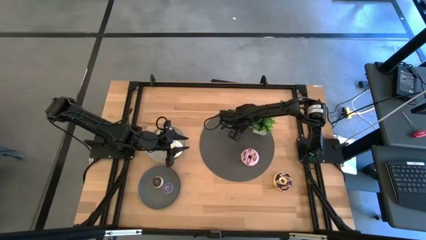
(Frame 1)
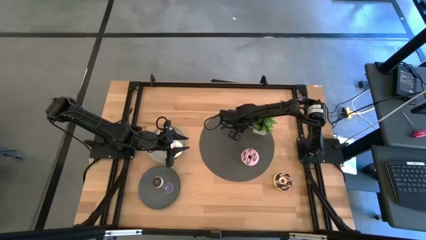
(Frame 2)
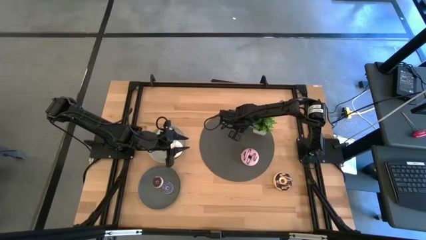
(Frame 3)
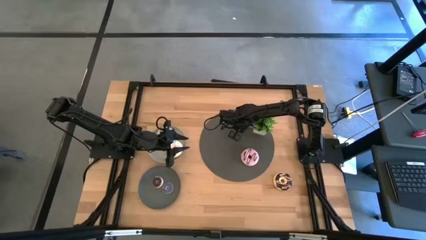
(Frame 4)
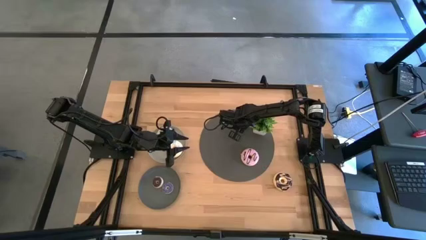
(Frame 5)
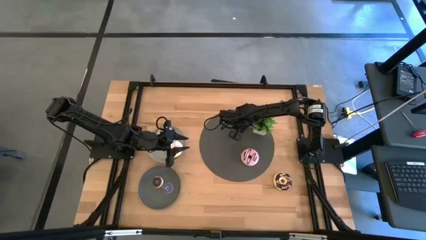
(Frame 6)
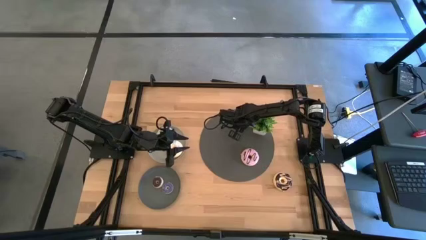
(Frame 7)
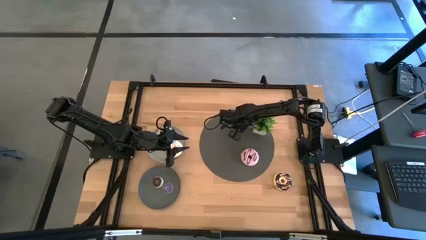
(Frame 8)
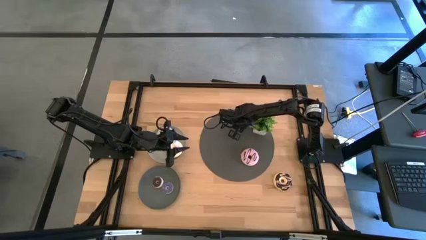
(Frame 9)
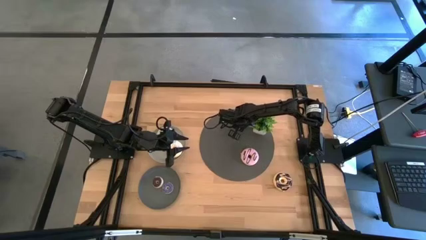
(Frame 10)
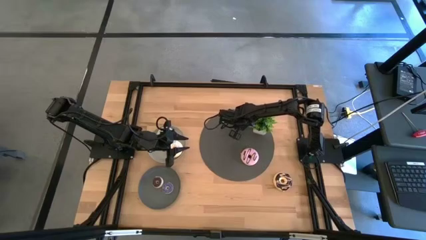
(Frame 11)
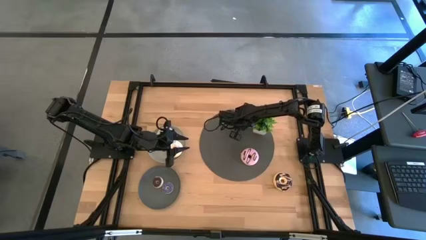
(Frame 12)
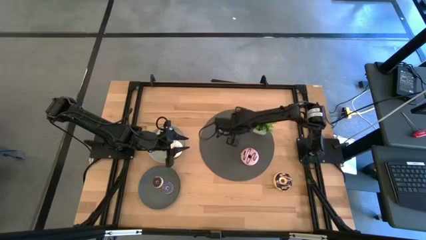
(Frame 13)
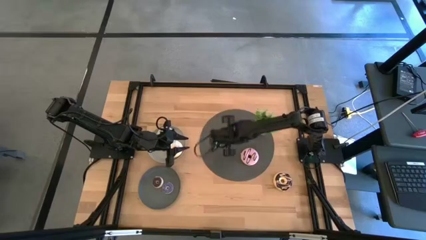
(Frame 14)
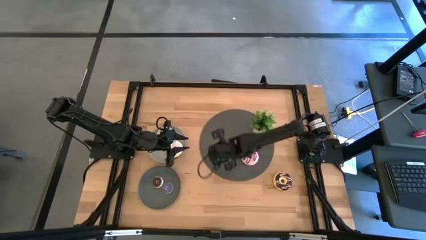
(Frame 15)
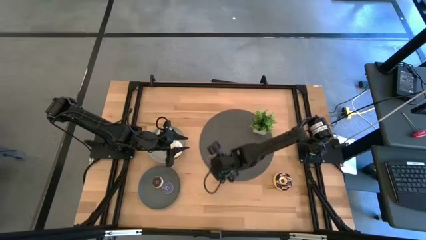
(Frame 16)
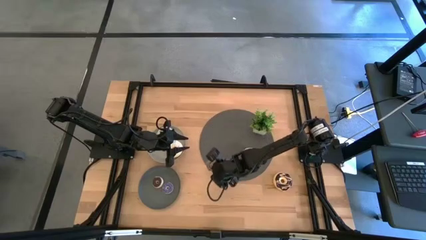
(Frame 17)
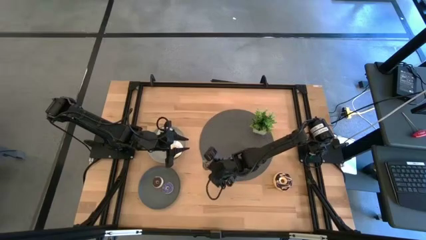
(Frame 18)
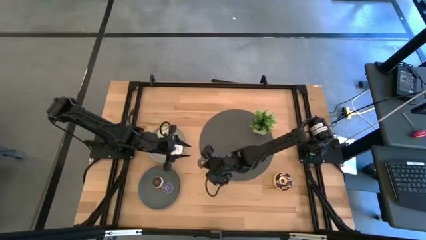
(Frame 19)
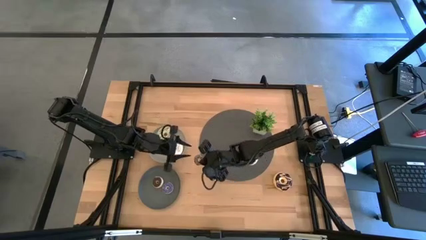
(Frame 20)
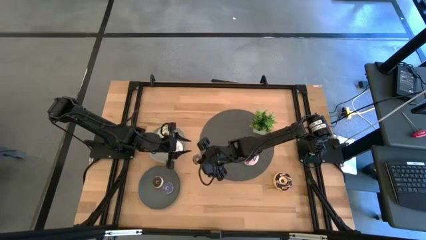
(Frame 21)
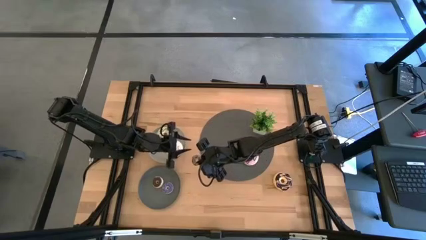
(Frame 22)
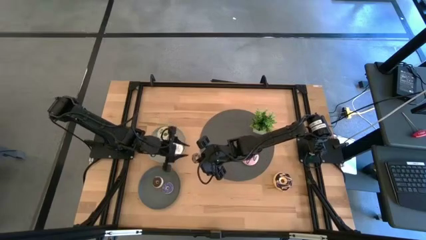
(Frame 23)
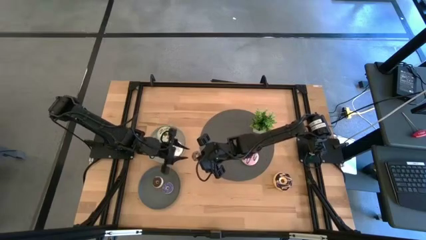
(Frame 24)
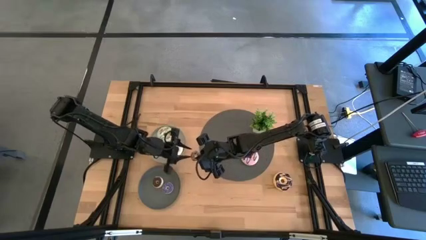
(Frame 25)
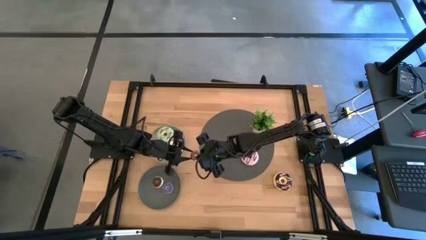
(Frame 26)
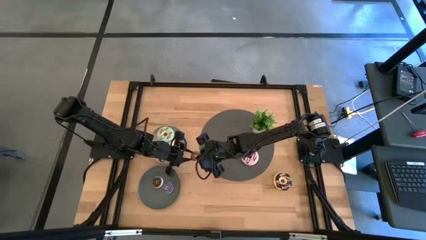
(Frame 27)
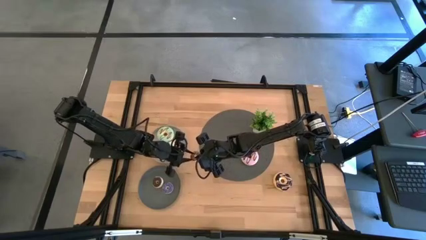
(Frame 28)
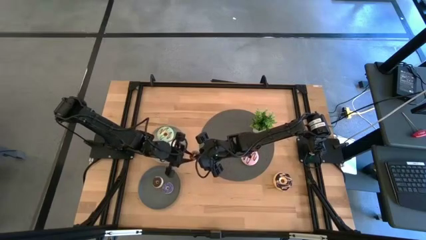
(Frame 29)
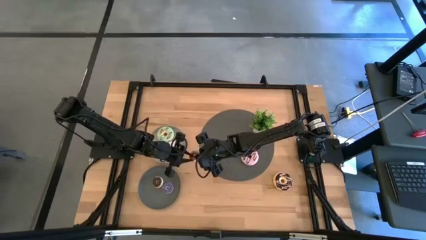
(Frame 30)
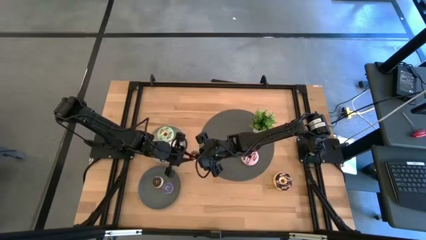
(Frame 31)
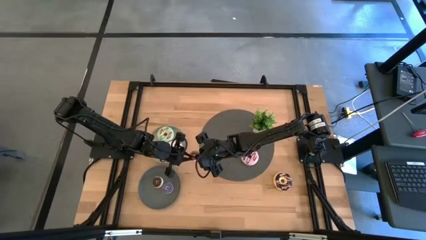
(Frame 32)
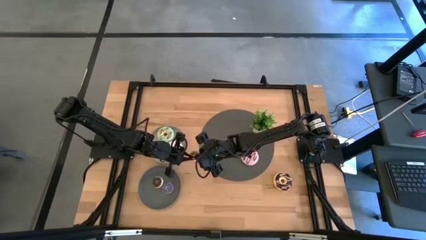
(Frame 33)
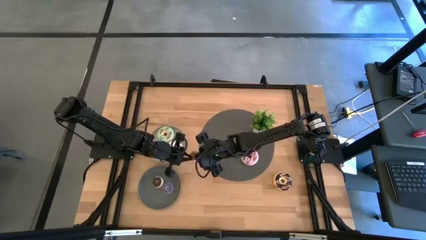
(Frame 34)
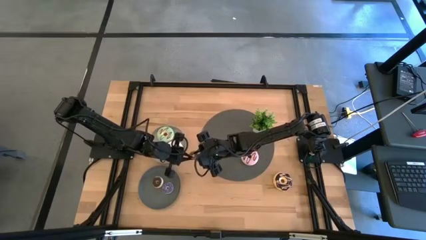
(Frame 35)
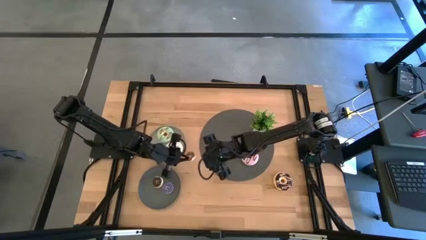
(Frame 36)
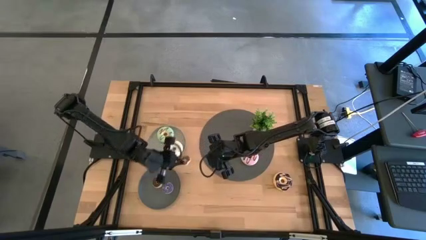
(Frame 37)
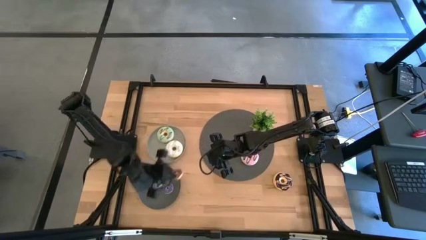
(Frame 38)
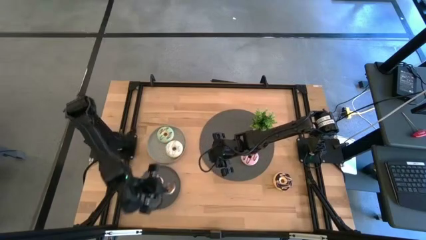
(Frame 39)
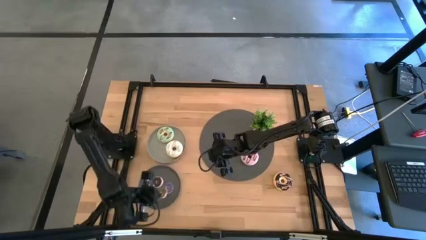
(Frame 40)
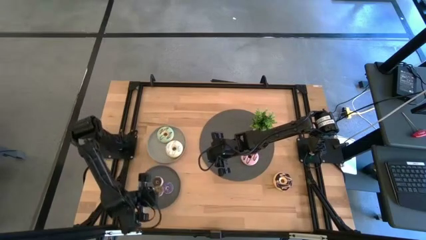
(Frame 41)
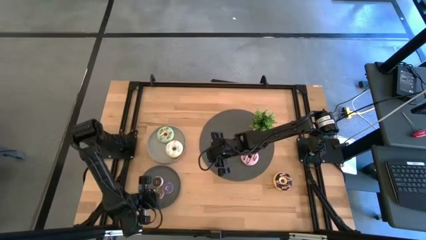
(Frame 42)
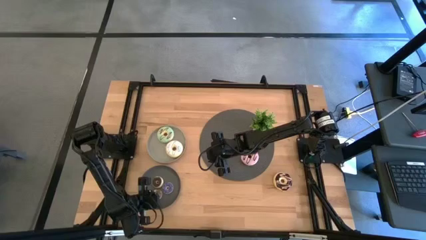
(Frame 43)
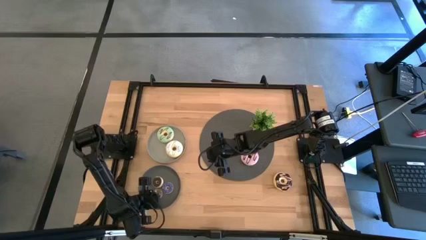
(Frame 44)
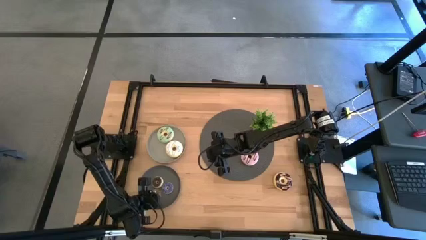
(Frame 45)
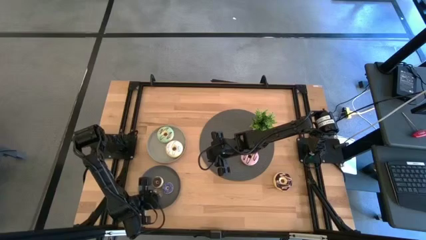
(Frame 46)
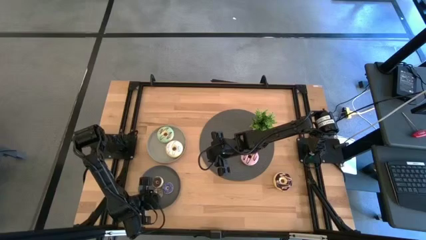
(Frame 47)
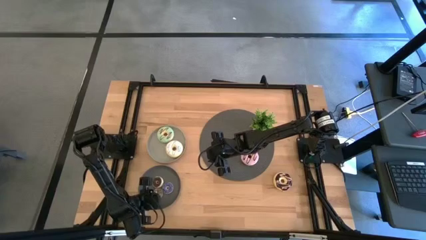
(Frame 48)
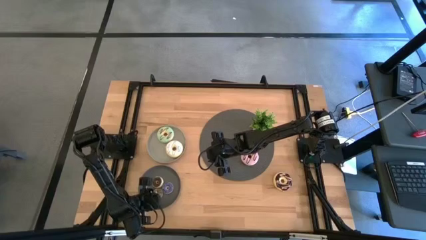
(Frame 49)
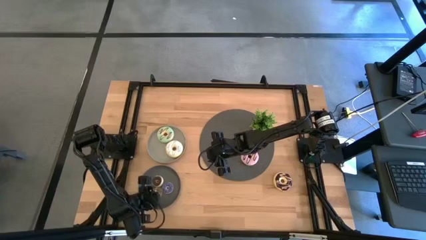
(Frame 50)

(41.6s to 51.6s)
Task: Pick & Place donuts
Put the small brown donut on the dark gray plate

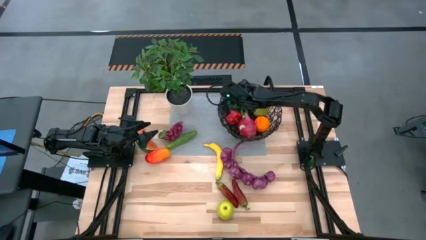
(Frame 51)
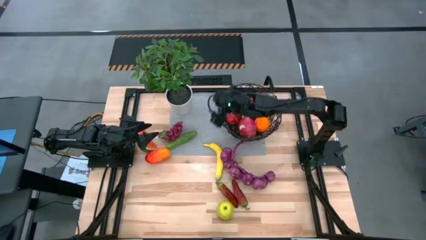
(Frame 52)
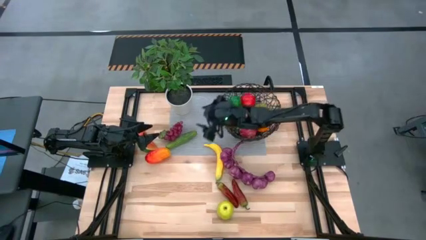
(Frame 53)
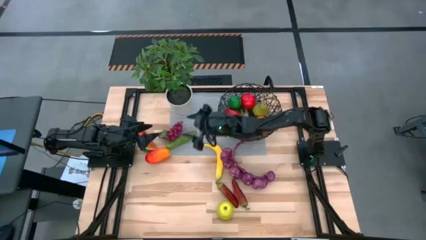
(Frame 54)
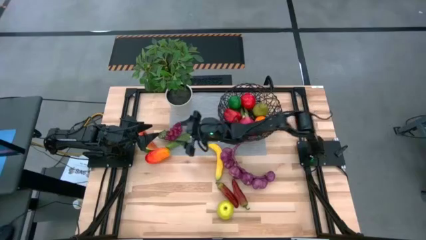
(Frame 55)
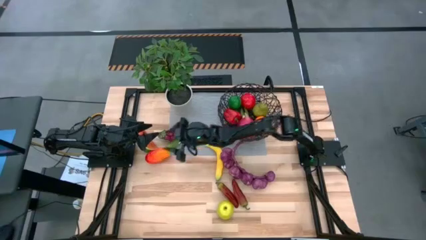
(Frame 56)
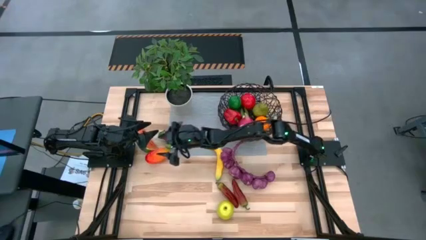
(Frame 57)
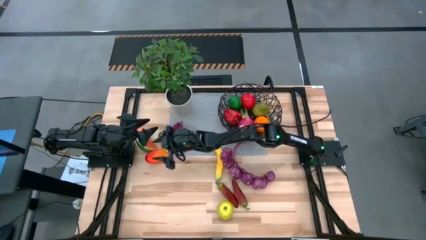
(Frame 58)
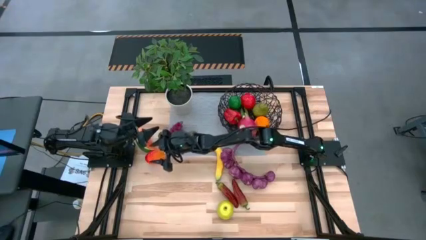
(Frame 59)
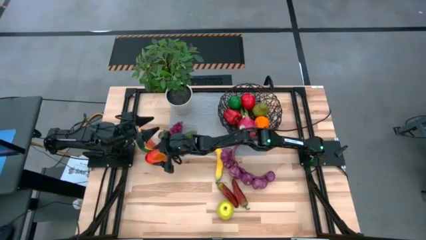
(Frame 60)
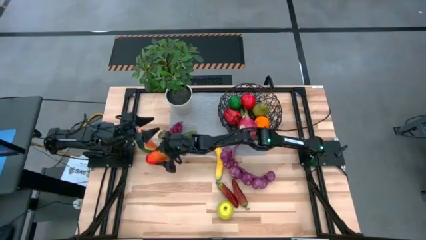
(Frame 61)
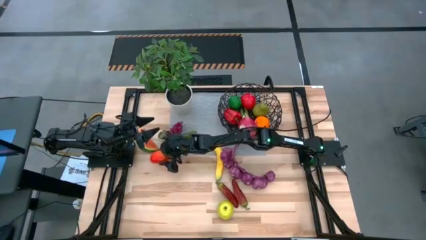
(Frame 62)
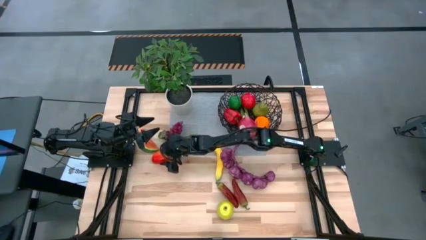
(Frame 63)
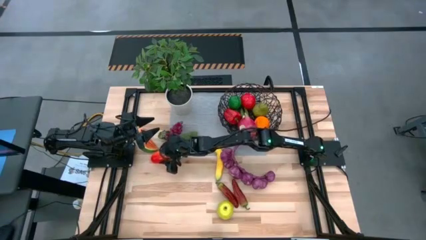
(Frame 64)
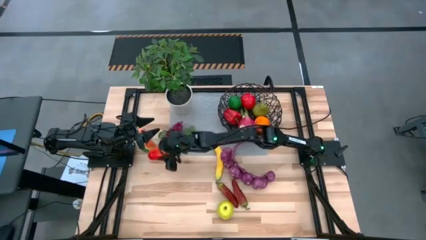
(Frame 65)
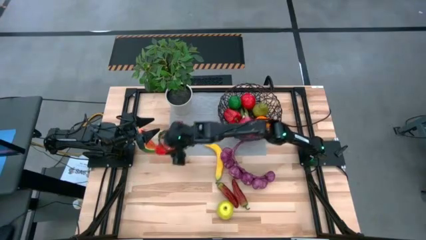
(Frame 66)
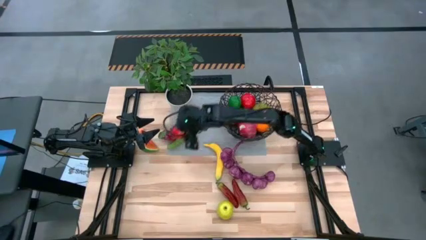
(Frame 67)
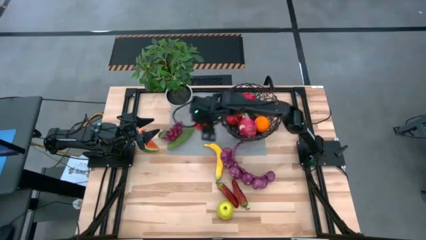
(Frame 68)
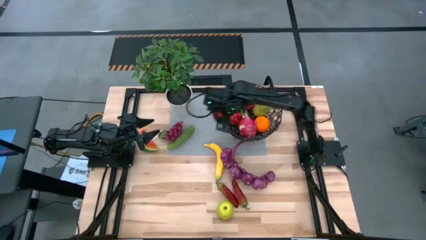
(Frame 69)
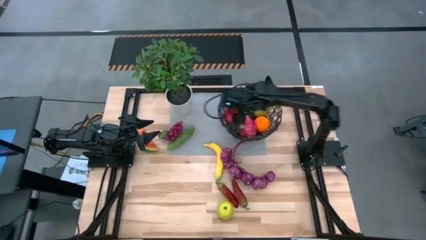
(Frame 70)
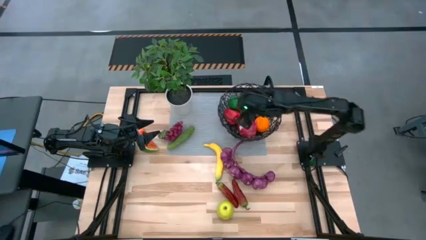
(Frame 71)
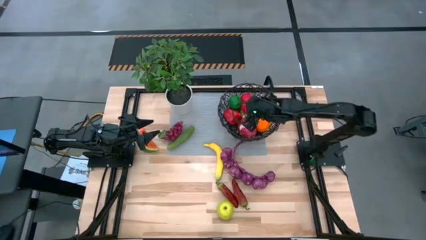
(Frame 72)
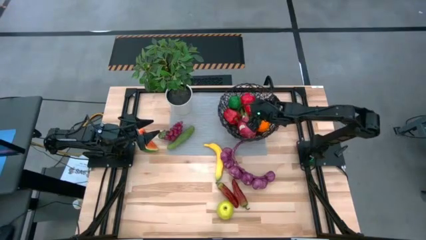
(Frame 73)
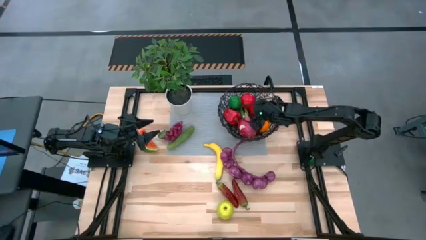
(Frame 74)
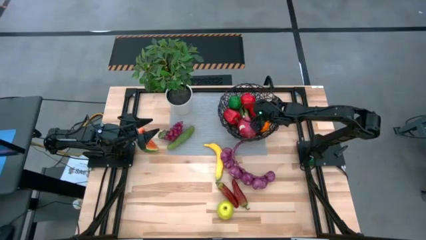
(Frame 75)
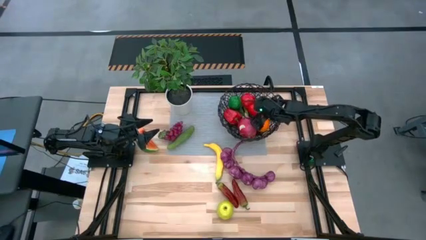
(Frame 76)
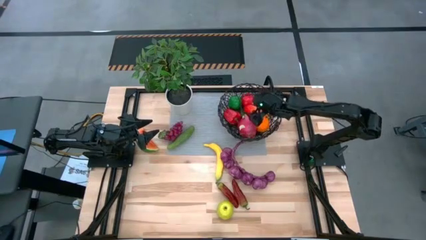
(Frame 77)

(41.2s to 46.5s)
Task: Build produce basket
Put the mango into the wire basket

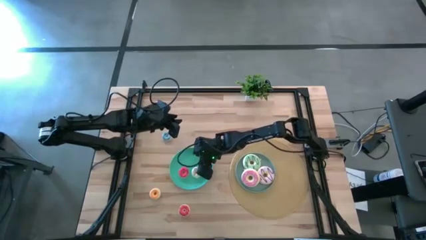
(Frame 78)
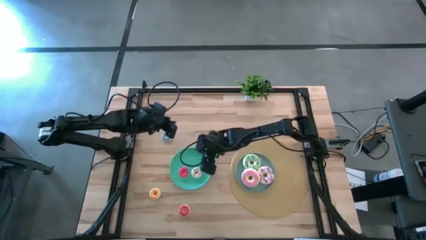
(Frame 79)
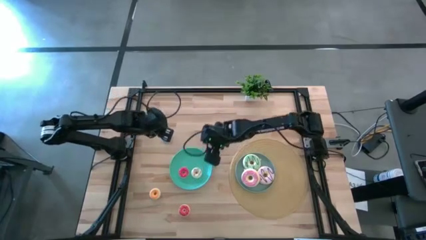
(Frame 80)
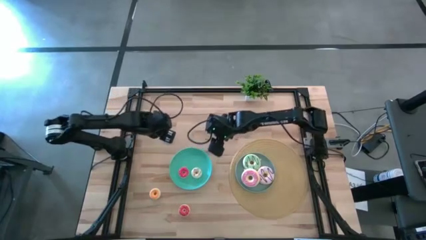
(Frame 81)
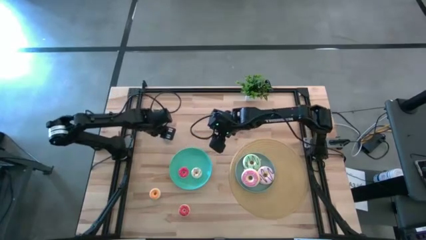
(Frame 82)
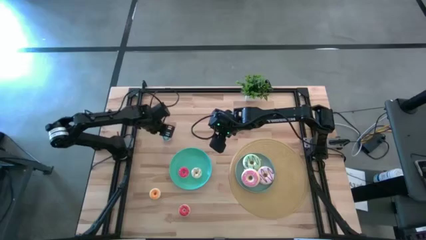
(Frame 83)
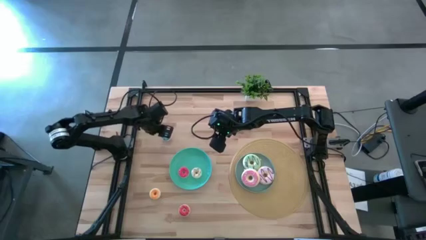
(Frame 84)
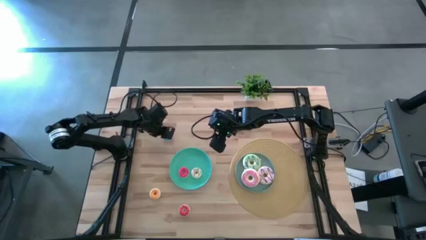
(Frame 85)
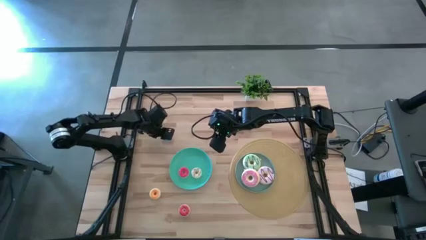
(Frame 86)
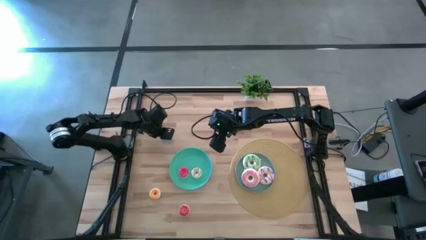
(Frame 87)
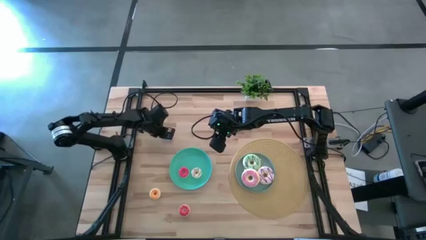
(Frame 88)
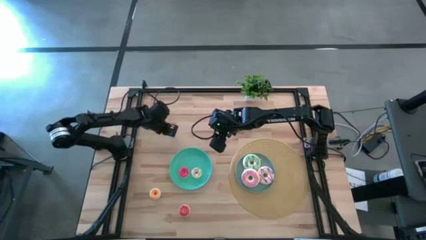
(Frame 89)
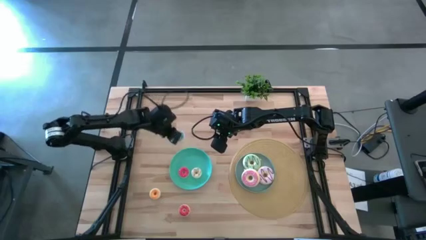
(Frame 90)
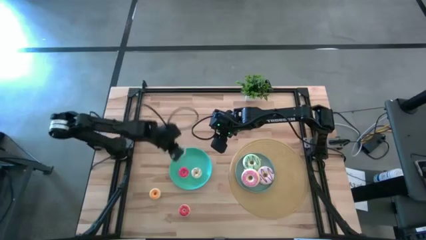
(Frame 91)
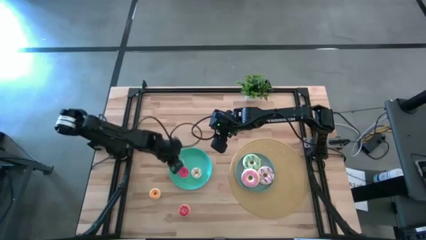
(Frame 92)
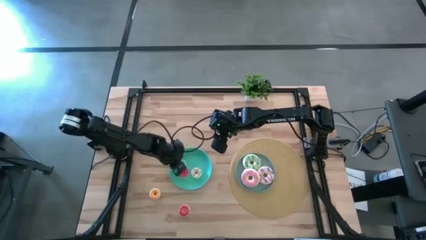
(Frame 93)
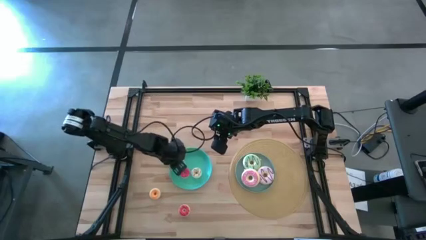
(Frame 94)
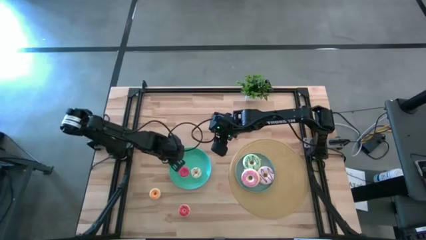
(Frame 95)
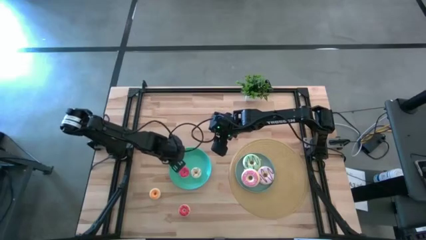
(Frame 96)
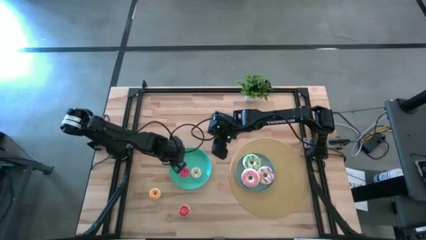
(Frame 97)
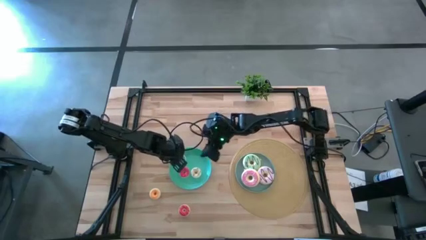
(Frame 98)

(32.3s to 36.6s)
Task: Pick & Place donuts
Put the small blue donut on the green plate
